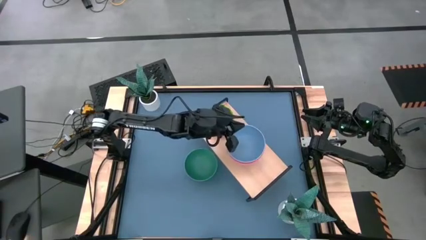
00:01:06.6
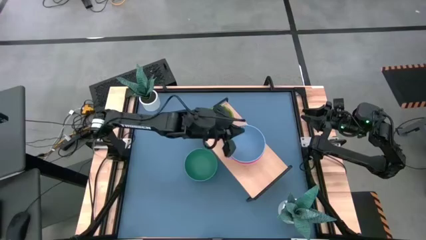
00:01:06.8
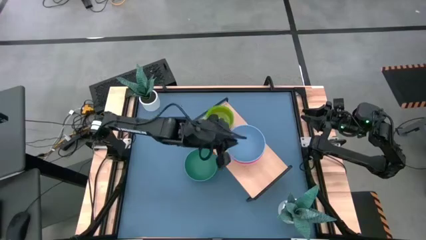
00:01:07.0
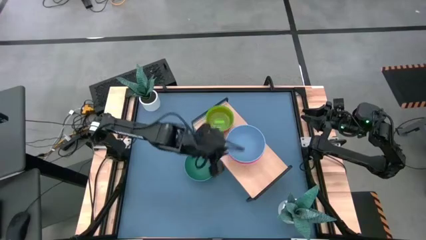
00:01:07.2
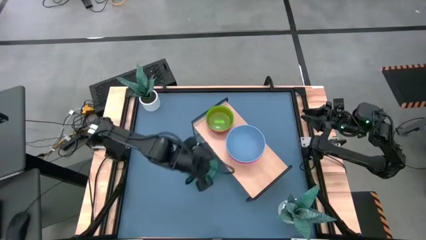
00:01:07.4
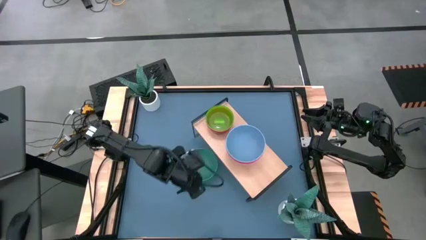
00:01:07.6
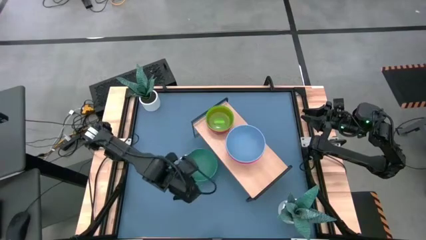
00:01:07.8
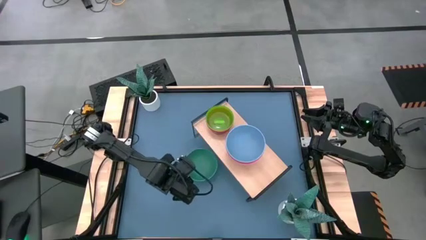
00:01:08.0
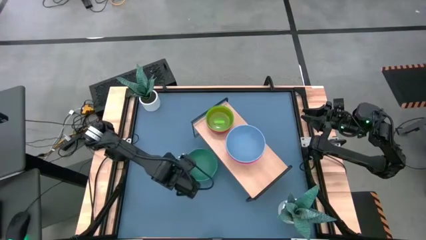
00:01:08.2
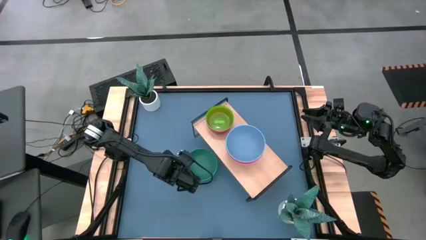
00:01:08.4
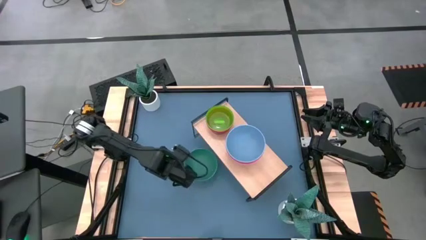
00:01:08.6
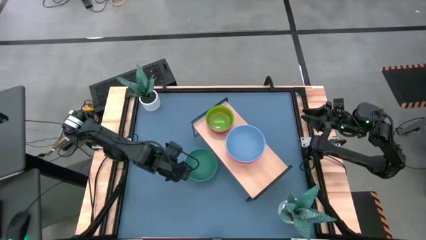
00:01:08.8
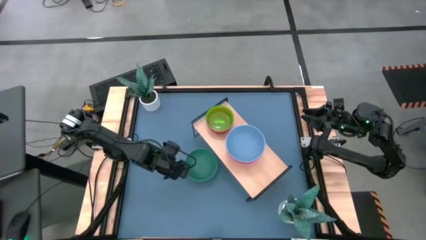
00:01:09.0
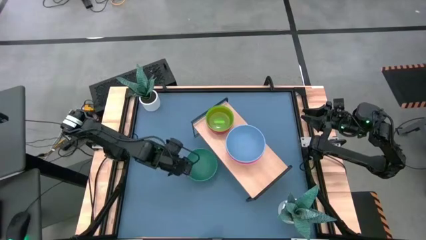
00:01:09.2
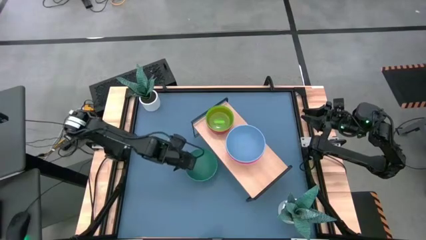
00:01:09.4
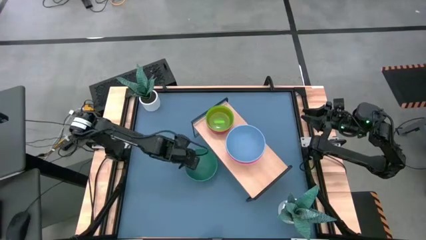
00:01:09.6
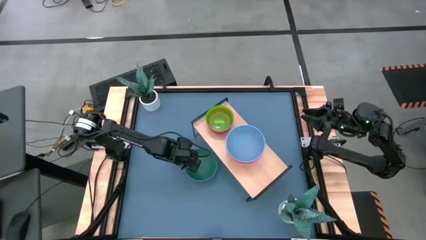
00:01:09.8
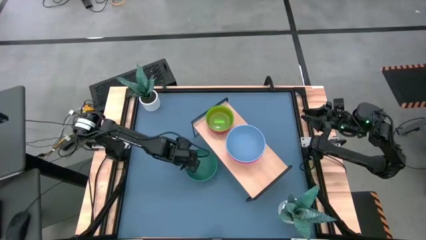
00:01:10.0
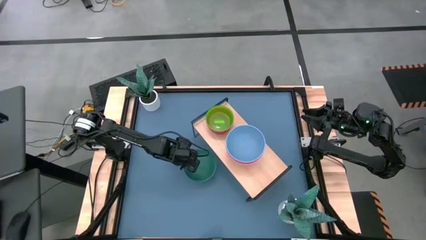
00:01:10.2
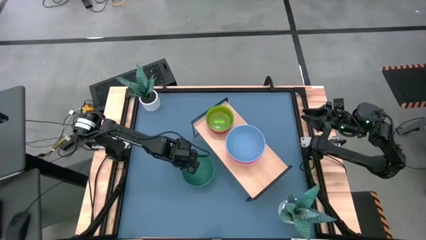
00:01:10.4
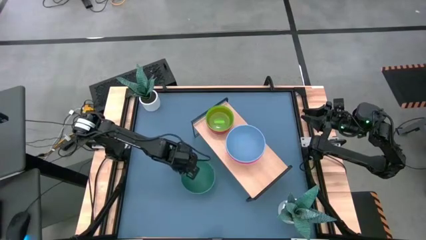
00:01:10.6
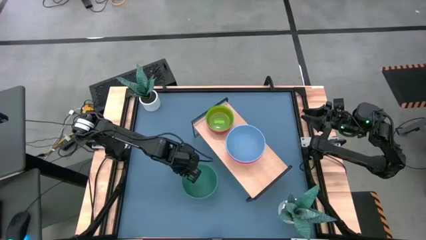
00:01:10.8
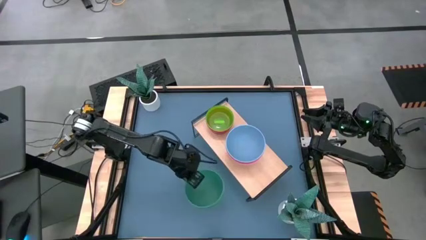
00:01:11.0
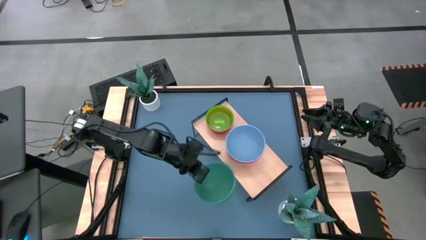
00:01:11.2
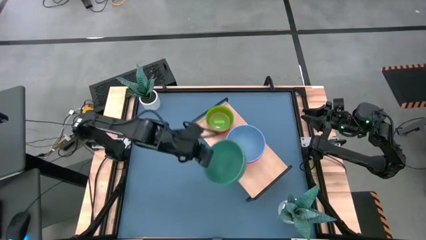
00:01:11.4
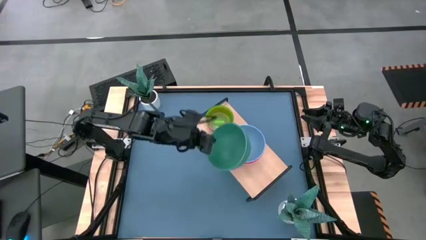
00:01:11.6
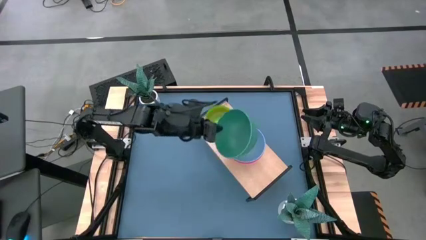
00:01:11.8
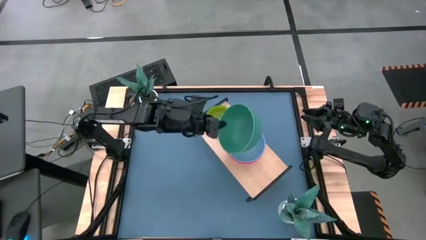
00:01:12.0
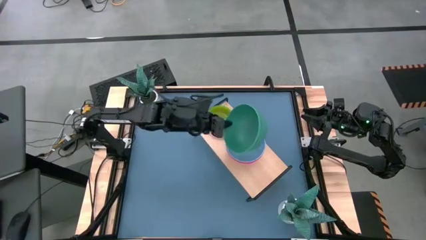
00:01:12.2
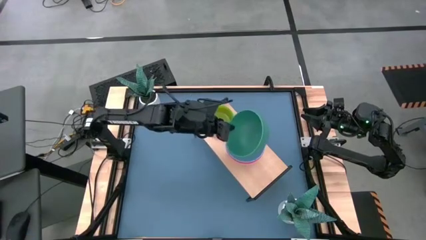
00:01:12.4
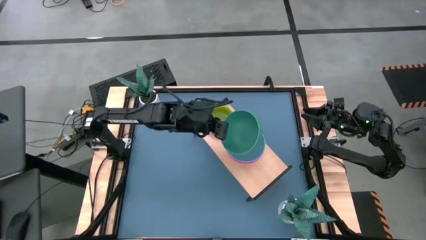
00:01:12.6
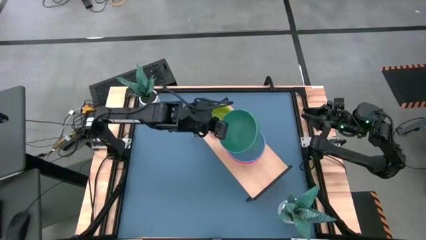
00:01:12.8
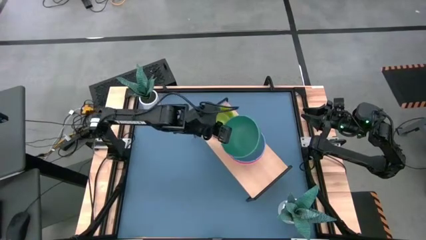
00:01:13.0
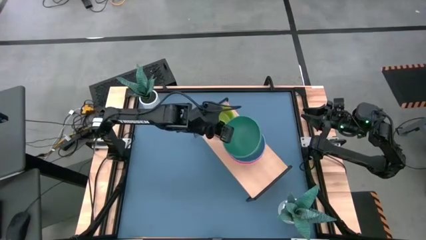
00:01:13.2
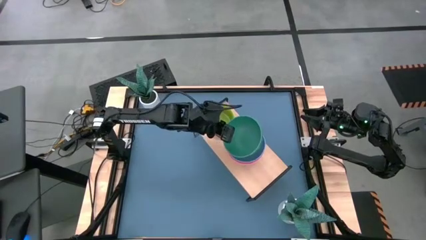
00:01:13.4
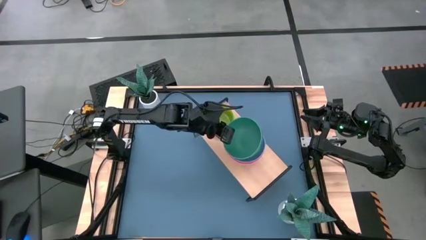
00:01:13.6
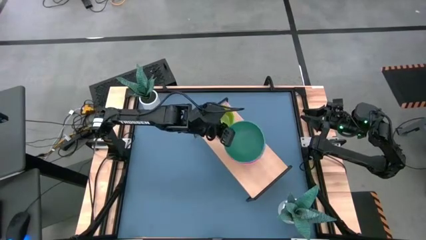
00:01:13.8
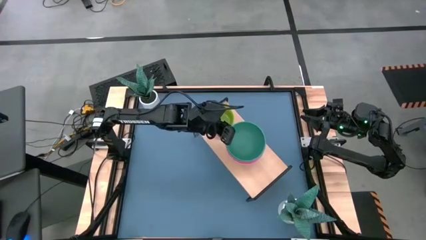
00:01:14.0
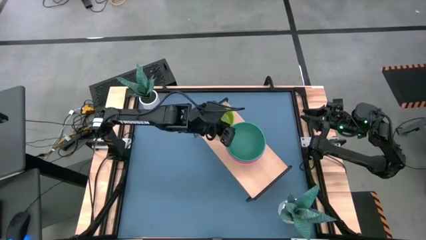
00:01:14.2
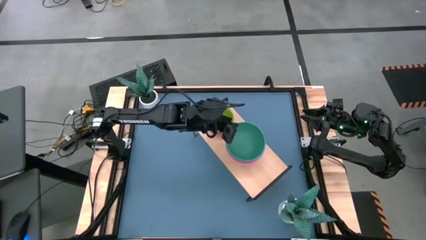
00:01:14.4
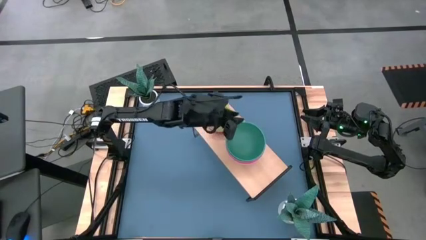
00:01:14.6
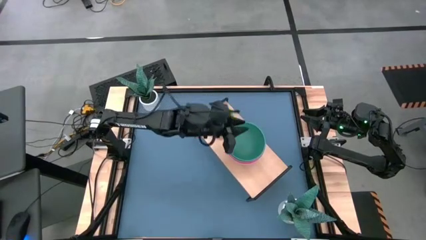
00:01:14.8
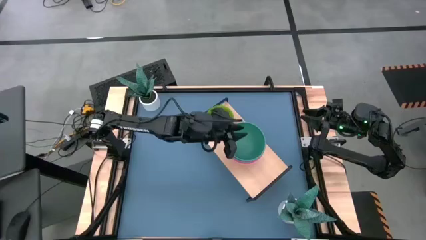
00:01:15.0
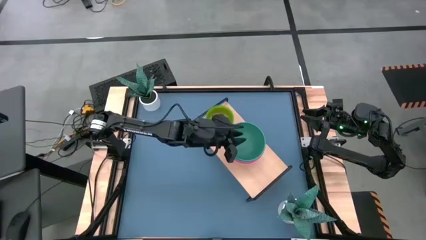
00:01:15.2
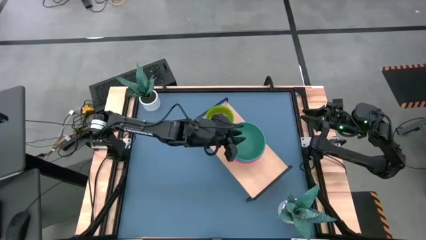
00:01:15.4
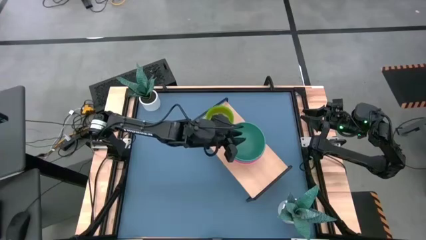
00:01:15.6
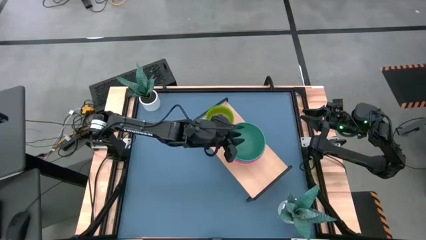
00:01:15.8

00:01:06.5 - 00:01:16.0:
Task: Place and stack bowls onto a shelf
Stack the green bowl on top of the light blue bowl on the shelf

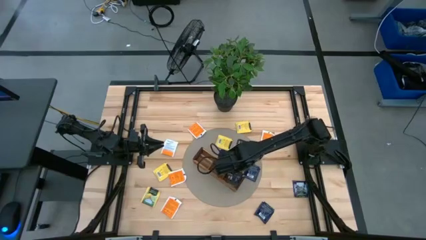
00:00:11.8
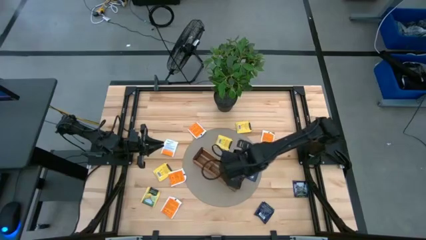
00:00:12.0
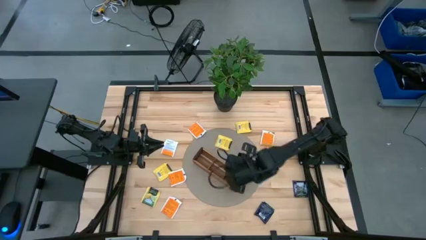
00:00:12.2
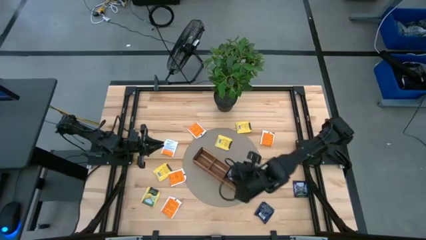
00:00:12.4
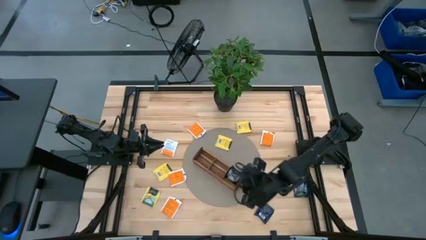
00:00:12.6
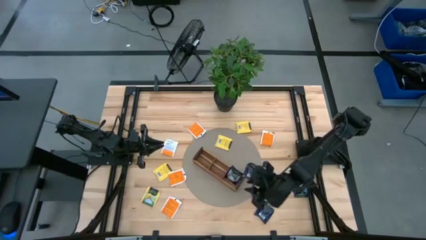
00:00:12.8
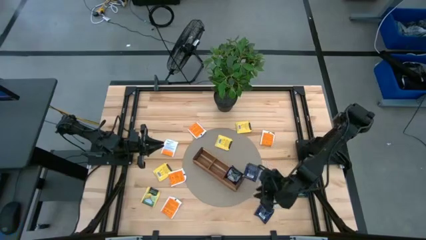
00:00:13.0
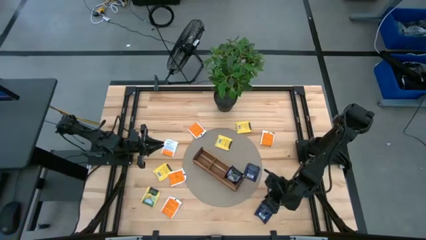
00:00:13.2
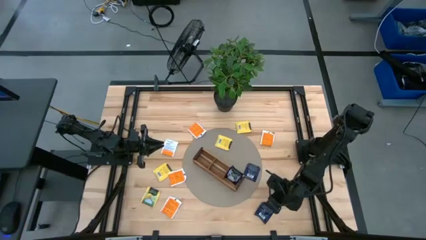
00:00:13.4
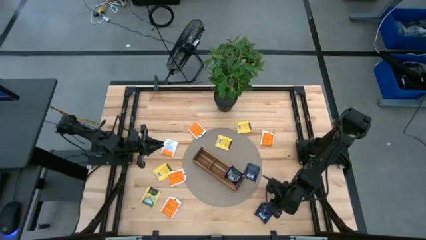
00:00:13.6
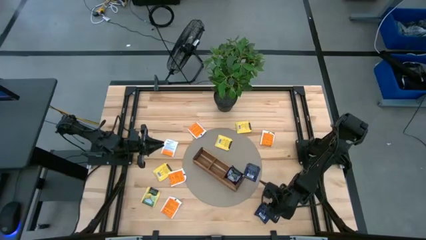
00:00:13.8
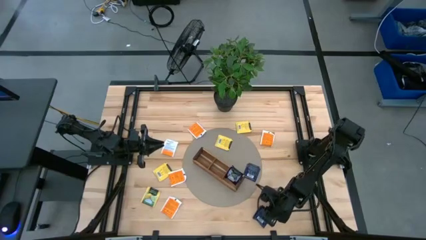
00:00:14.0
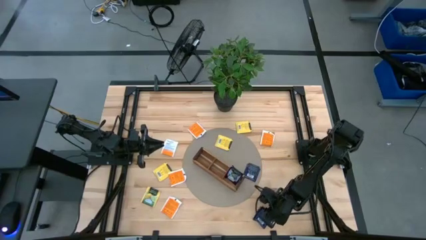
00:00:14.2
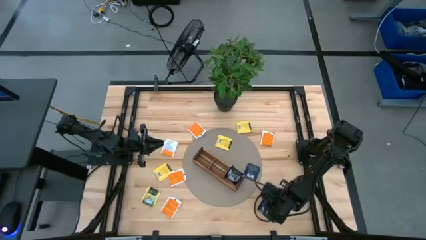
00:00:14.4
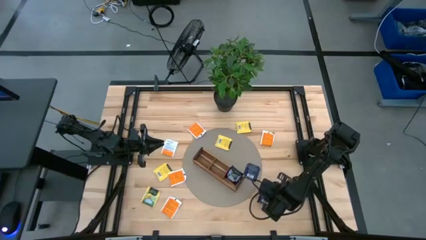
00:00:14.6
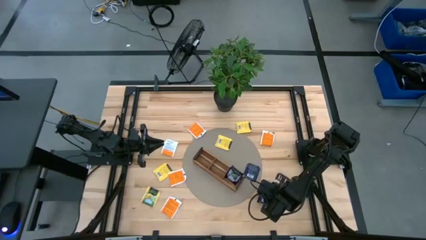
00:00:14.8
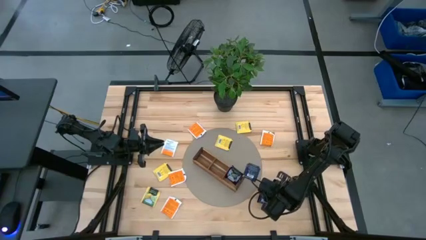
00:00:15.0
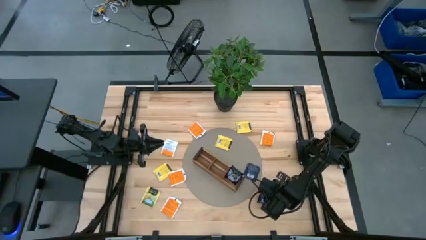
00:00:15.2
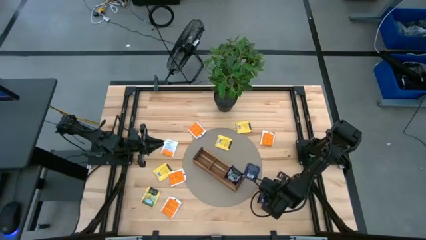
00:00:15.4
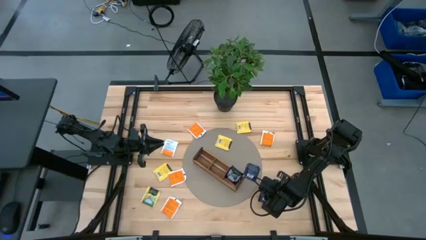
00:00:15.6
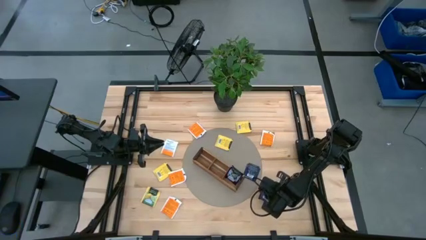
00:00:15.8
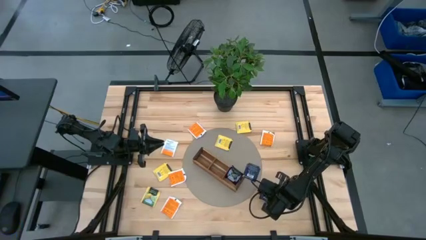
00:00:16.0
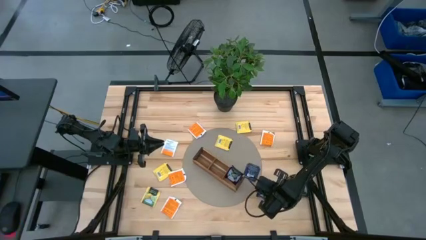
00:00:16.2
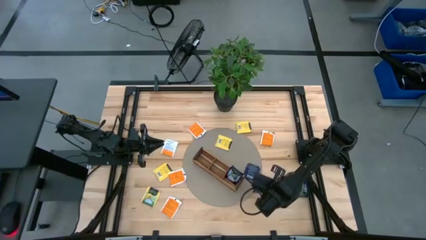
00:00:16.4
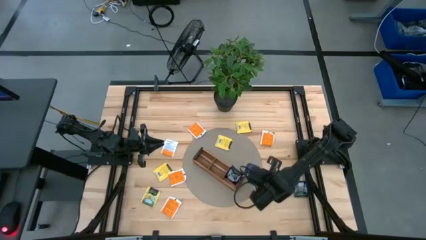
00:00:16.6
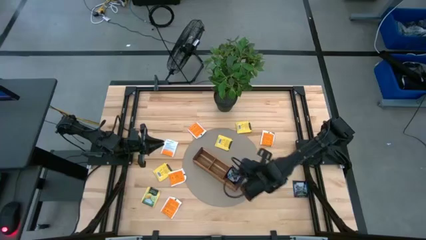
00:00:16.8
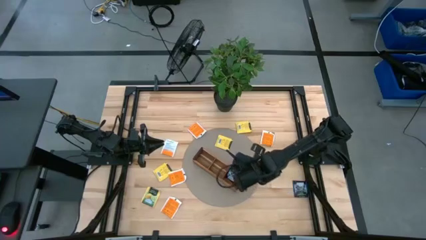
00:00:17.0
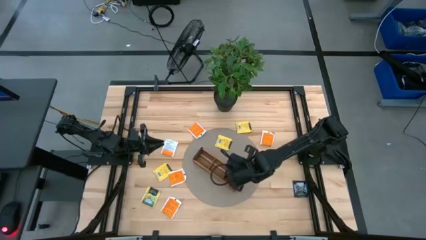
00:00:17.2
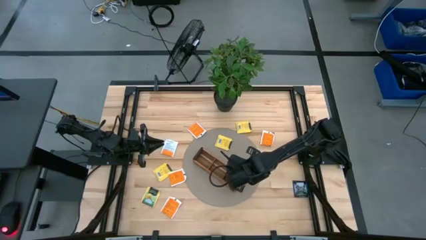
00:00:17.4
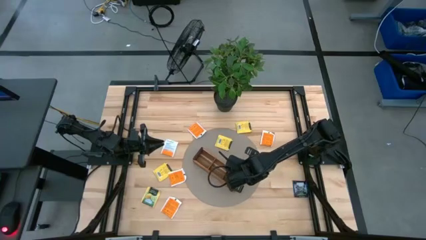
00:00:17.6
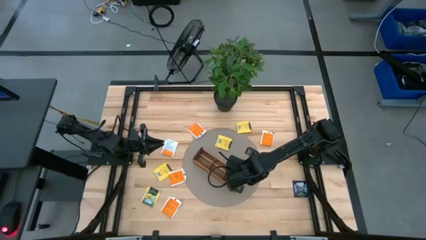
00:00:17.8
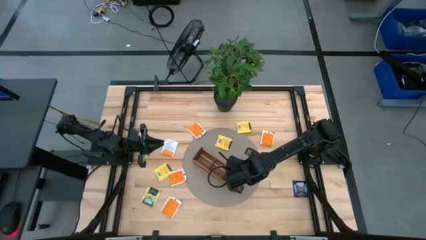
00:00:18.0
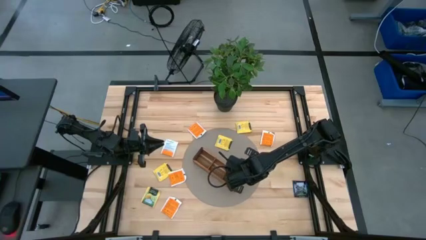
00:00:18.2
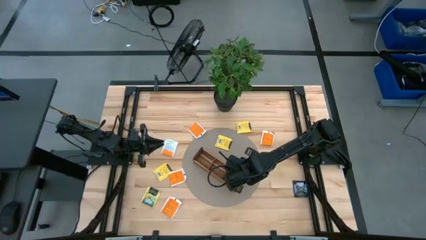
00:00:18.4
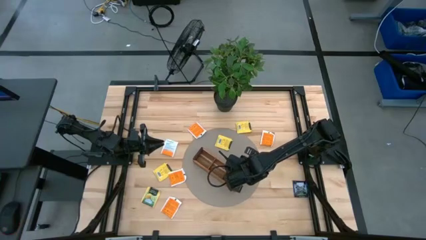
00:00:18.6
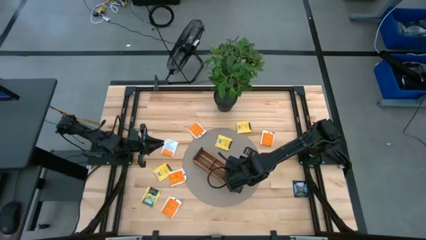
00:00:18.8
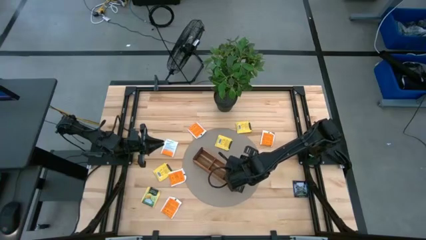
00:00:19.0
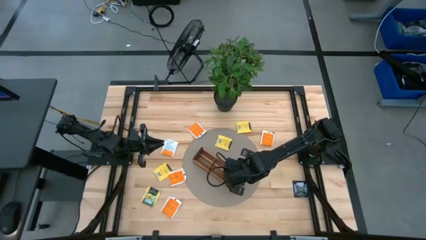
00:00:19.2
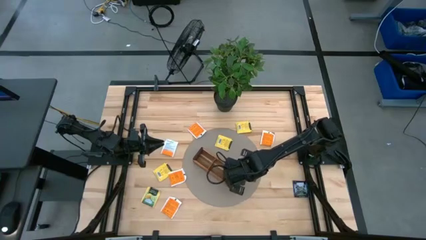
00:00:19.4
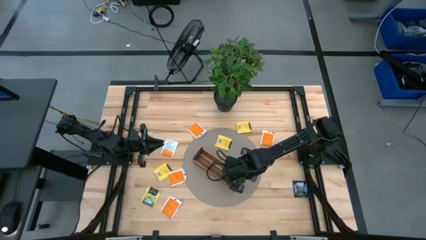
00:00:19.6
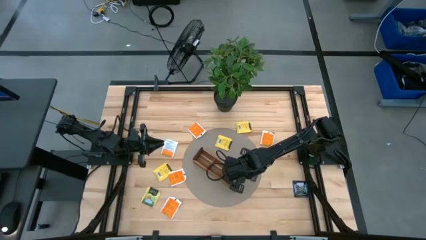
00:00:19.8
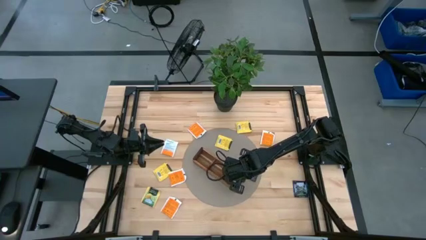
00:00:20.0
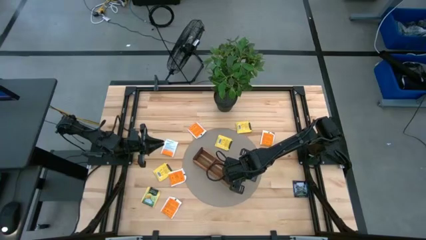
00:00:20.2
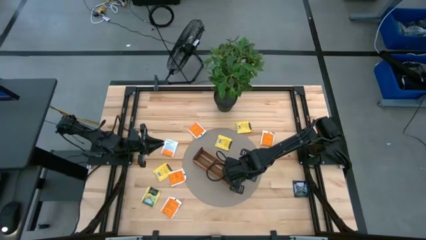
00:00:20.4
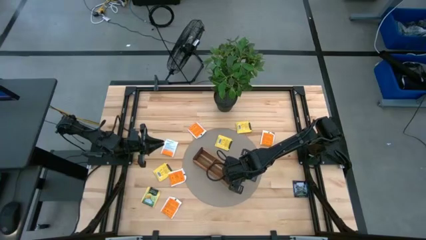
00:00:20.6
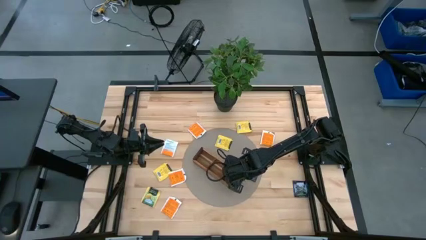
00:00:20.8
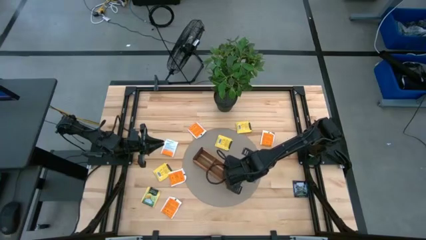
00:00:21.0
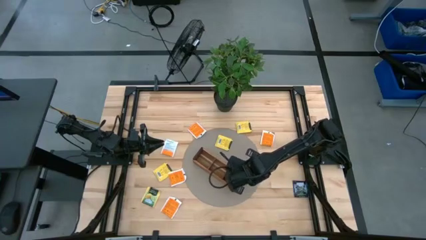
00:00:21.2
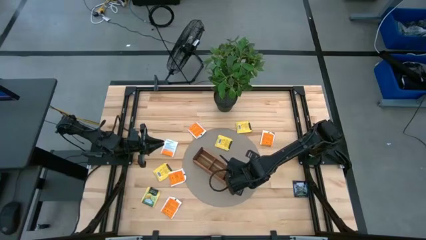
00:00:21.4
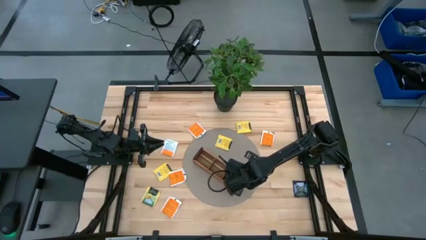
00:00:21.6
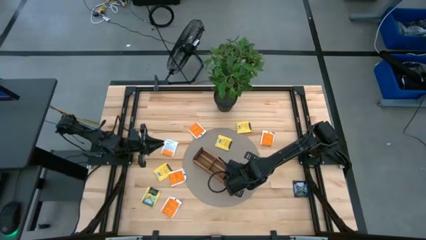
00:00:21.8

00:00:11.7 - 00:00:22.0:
Task: Pick & Place Tea
Put the black tea bag into the right section of the wooden organizer
